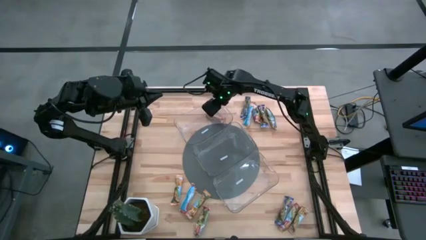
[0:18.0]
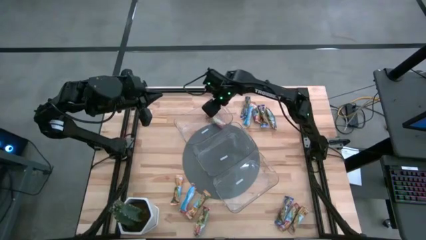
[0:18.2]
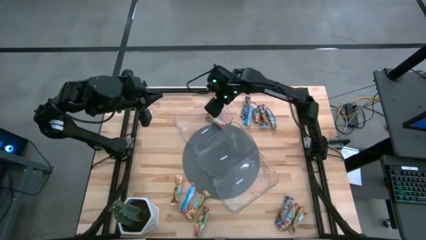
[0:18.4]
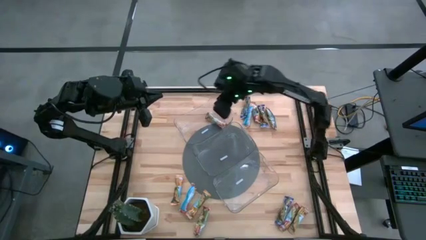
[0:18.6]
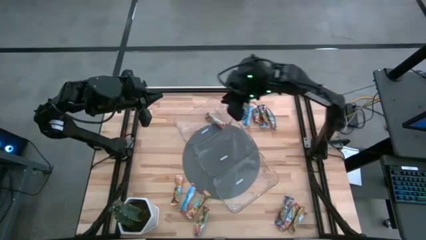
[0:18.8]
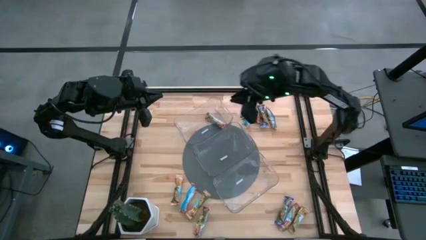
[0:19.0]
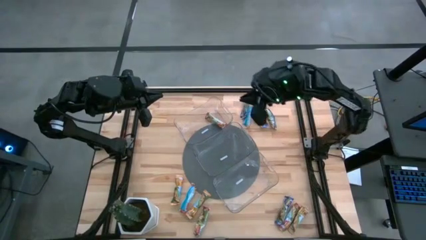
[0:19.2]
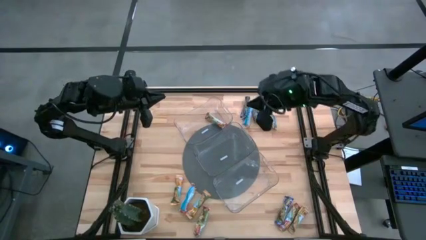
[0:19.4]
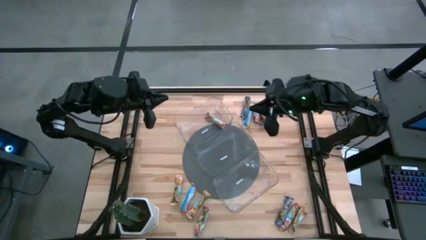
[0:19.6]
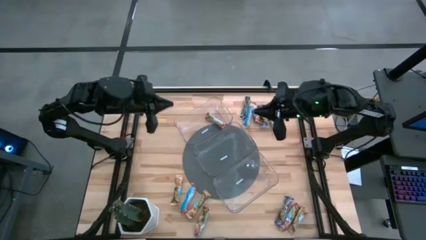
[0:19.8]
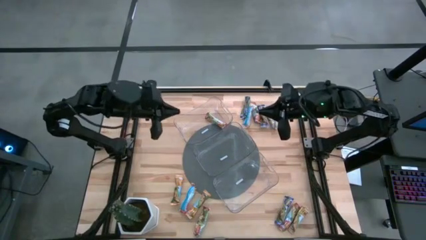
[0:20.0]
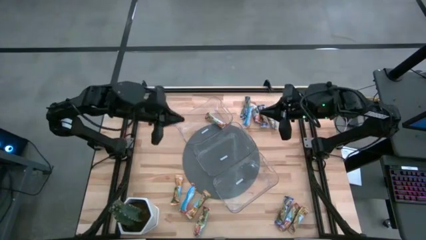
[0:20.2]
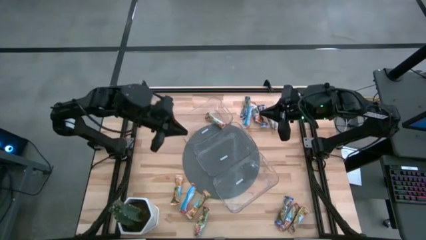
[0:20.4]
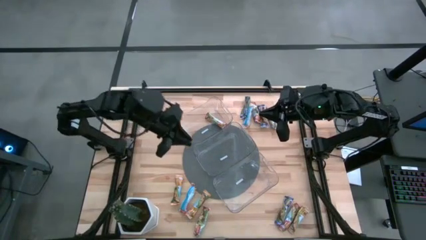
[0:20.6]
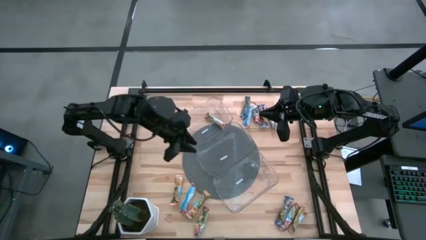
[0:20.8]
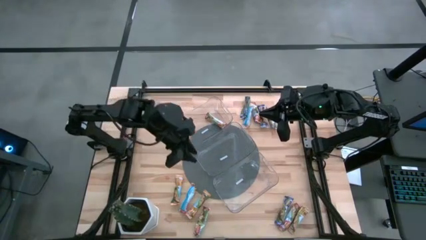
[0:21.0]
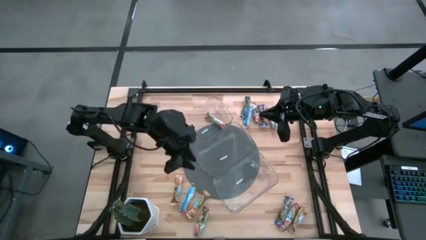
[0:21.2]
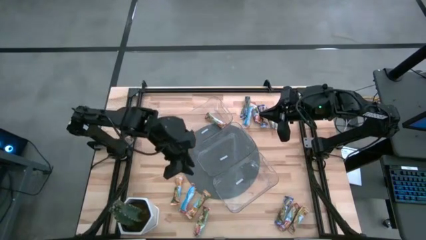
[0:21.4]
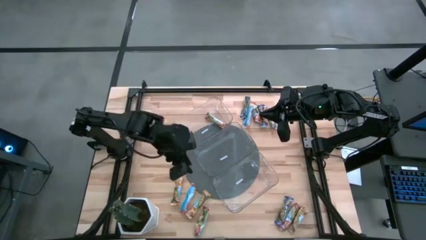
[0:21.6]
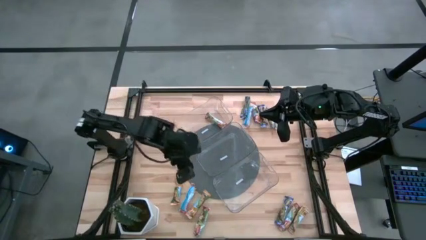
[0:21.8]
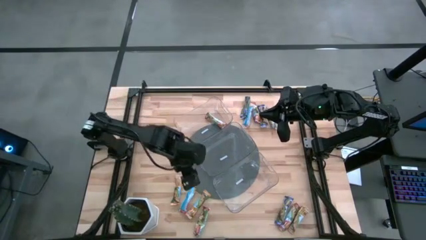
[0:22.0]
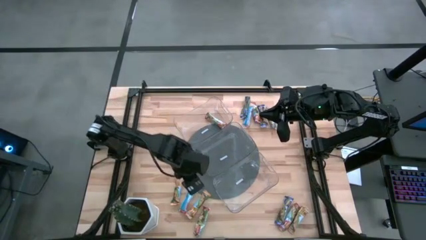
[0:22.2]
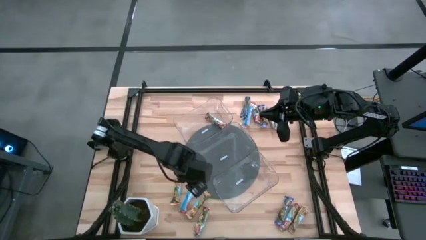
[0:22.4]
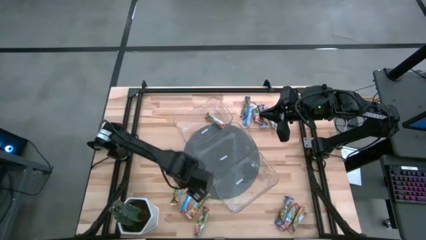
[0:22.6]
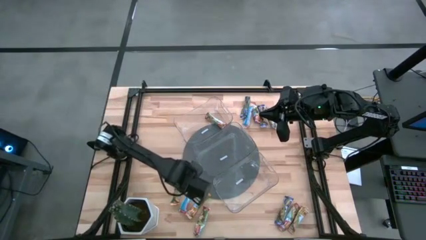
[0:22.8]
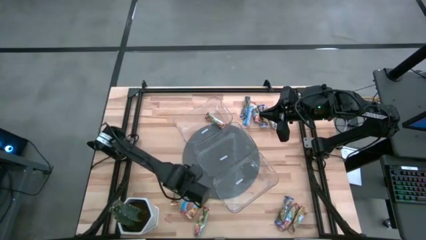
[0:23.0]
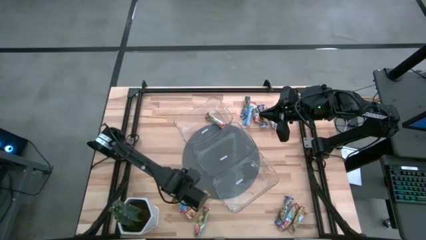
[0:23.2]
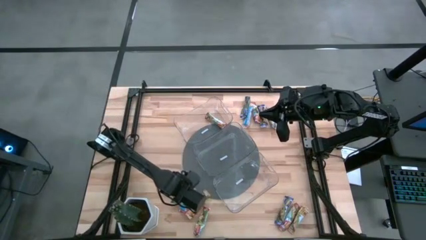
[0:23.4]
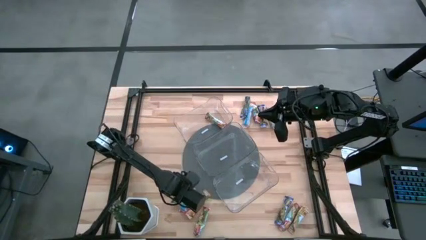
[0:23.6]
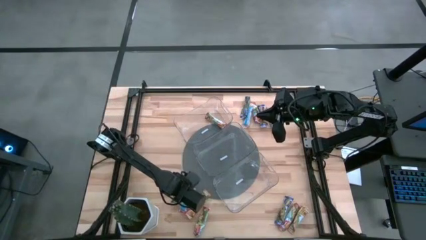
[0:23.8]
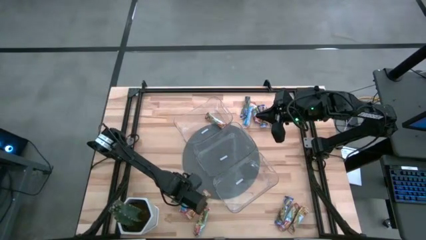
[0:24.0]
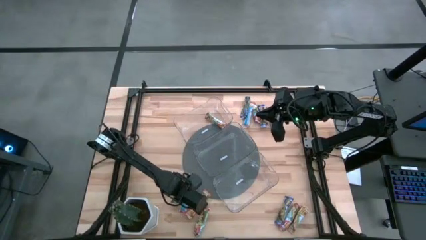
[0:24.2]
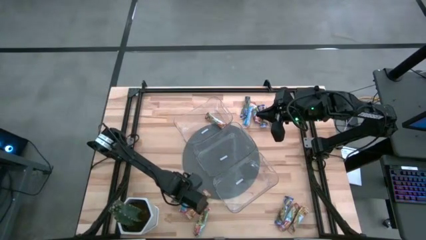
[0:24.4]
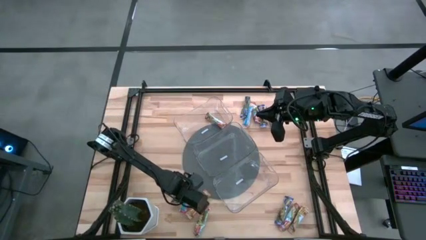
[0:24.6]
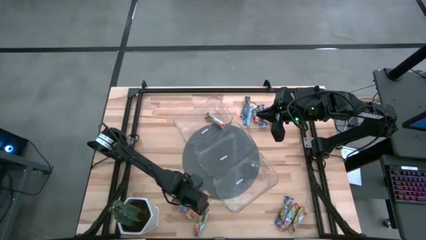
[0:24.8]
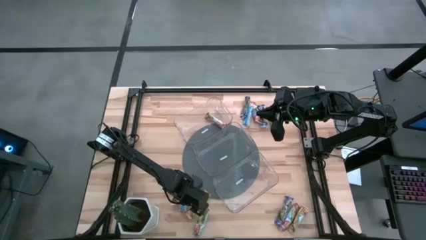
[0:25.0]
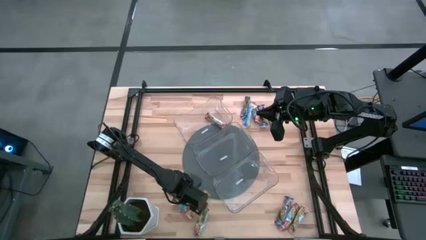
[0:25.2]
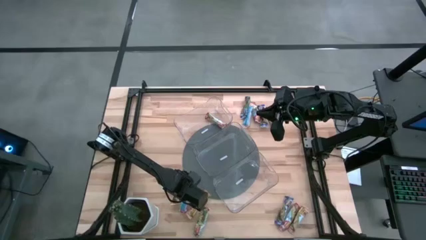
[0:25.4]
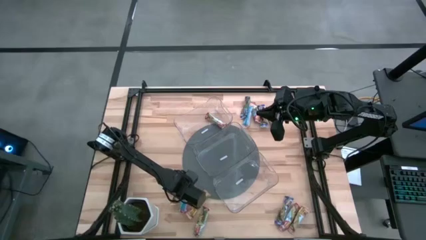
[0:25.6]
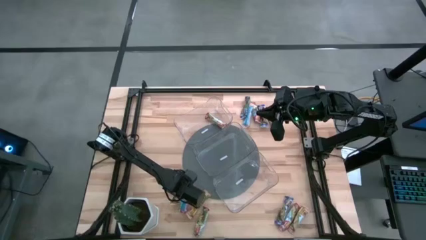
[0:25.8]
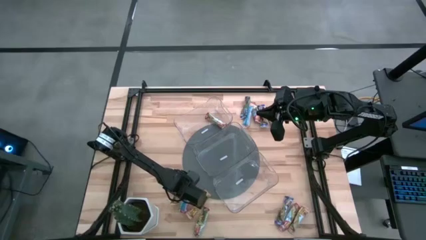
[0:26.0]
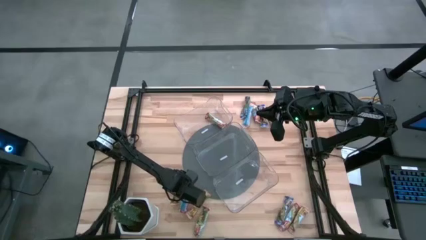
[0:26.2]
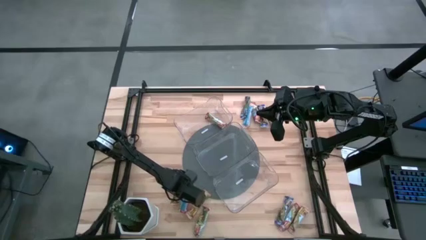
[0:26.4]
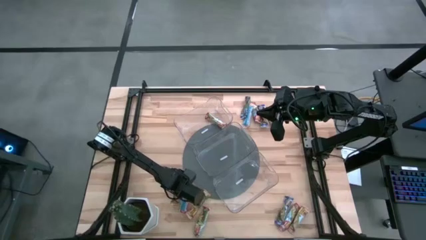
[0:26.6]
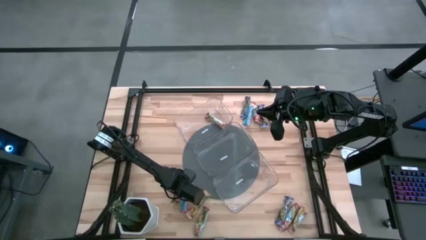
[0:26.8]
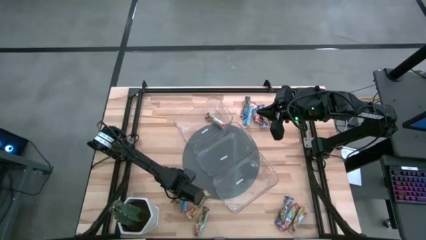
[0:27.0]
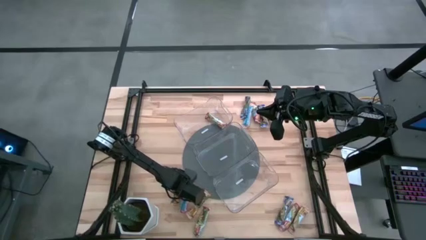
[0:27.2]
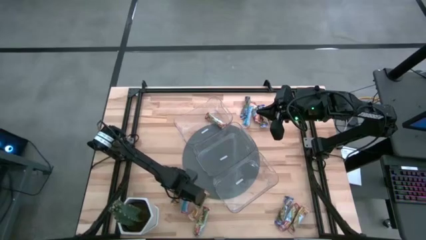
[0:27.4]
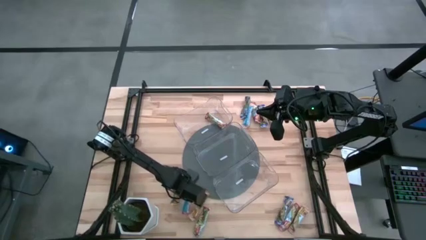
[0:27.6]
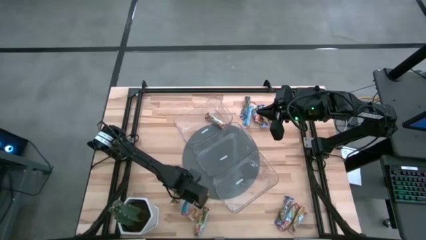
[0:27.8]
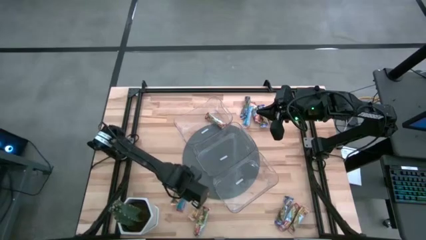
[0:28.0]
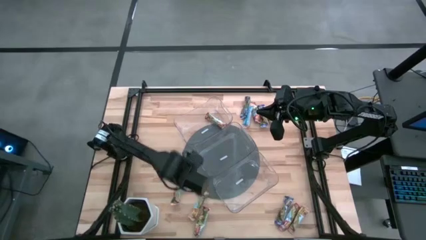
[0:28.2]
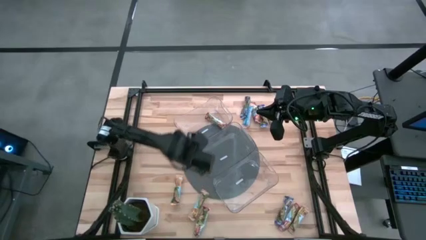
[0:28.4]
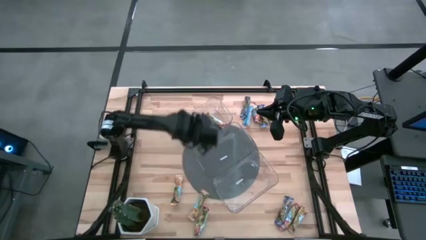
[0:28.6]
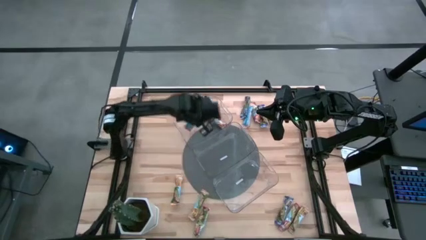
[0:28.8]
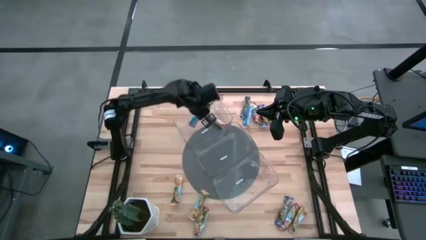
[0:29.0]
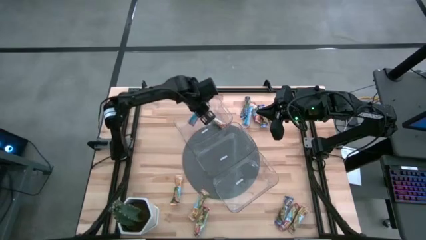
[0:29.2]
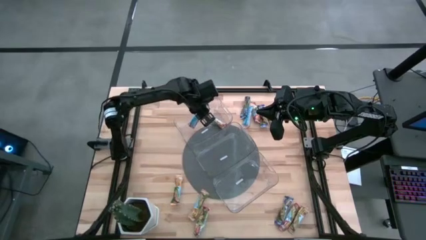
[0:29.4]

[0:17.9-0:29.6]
Task: Pick and place Granola Bars by type
Put the red granola bar into the top transparent bin
